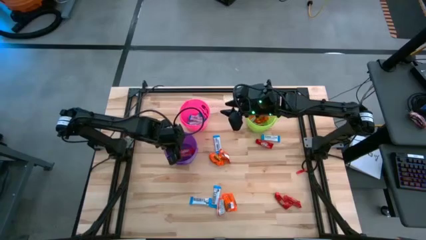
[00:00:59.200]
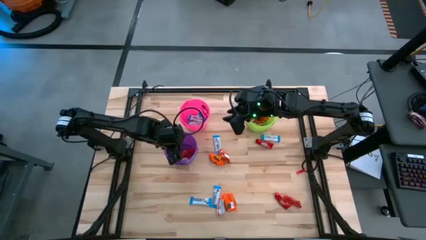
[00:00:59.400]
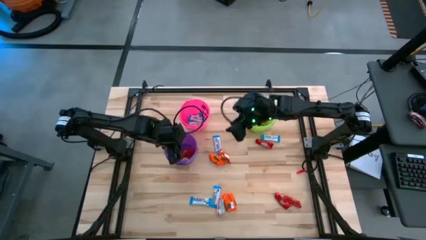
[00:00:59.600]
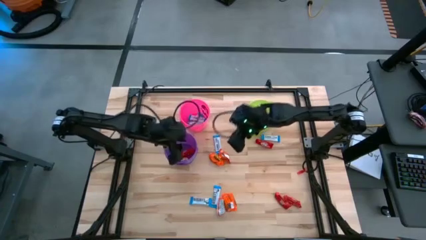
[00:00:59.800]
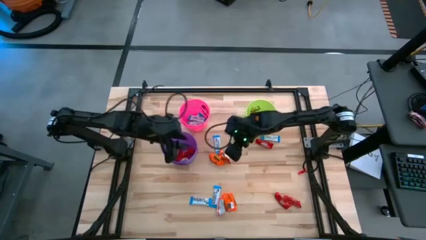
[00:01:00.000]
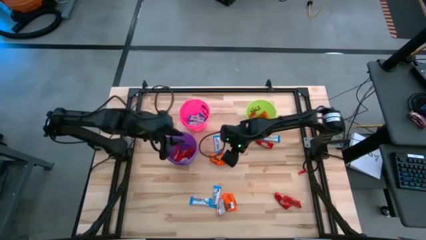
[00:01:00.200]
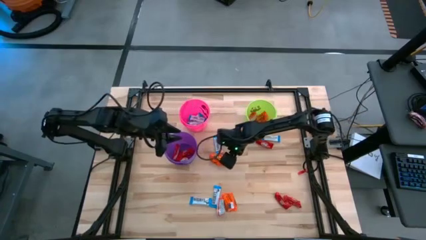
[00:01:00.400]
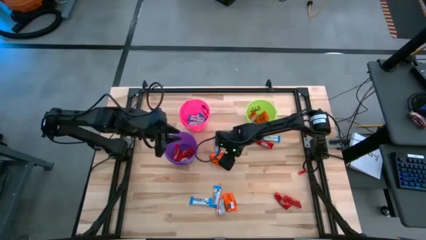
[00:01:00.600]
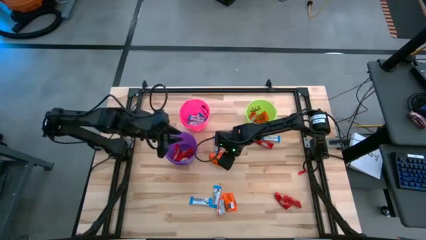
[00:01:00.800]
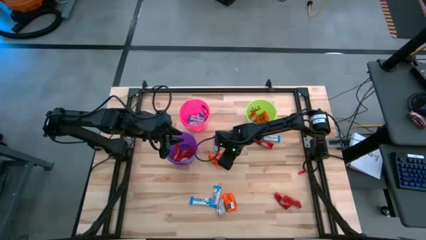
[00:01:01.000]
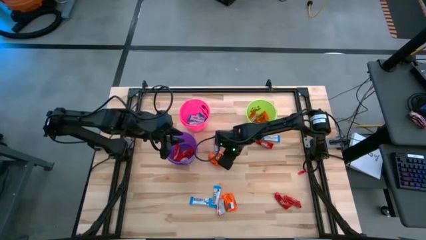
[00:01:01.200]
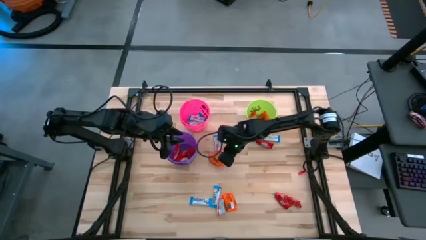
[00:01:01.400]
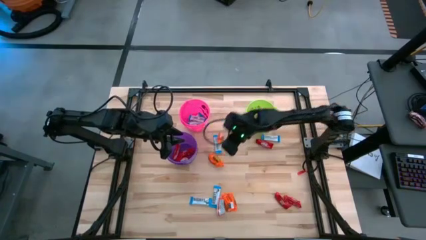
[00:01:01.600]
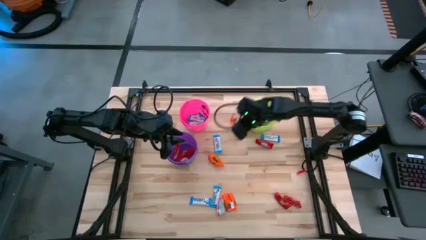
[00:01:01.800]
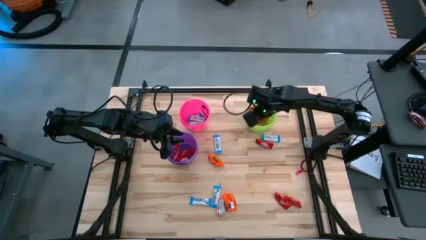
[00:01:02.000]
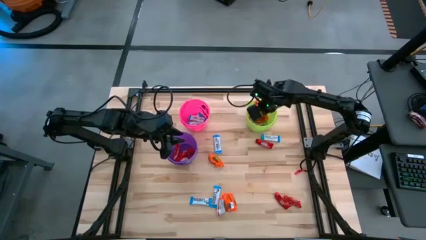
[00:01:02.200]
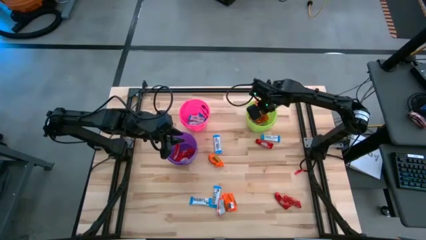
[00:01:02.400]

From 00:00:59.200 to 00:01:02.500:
Task: Sort candy
Put the orange chocolate into the green bucket

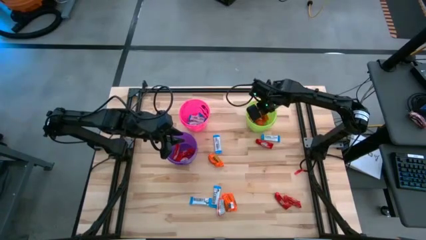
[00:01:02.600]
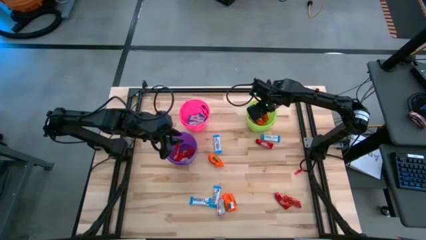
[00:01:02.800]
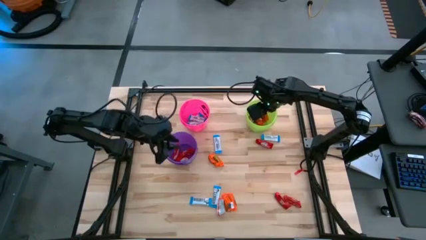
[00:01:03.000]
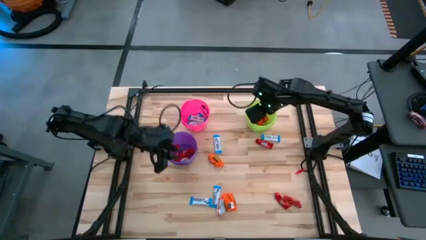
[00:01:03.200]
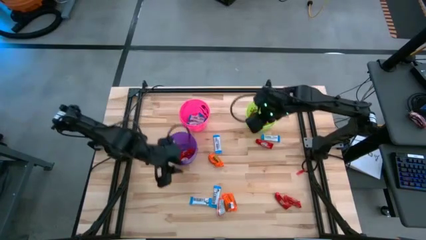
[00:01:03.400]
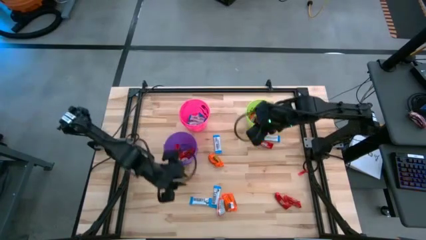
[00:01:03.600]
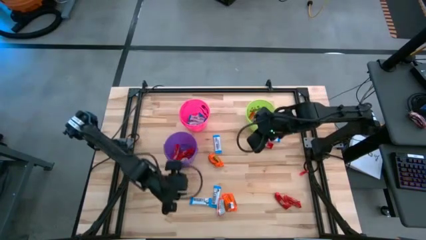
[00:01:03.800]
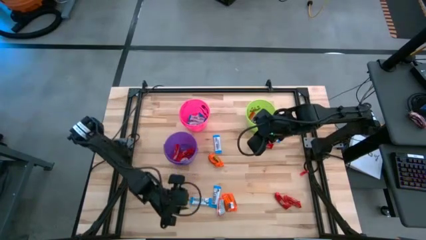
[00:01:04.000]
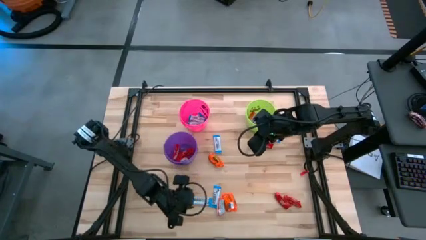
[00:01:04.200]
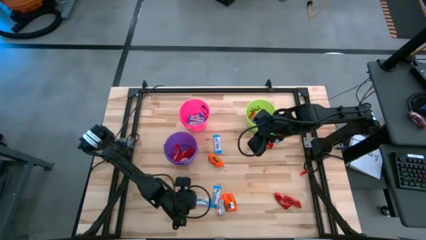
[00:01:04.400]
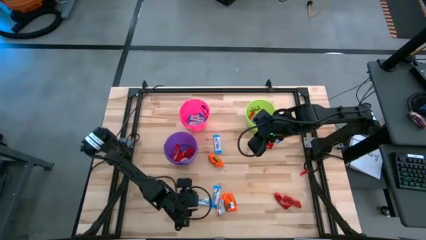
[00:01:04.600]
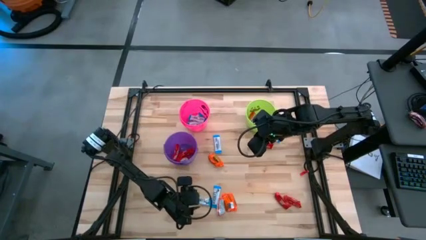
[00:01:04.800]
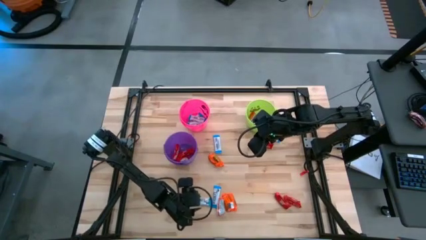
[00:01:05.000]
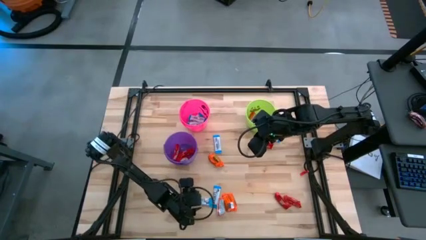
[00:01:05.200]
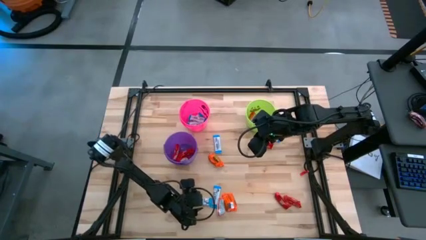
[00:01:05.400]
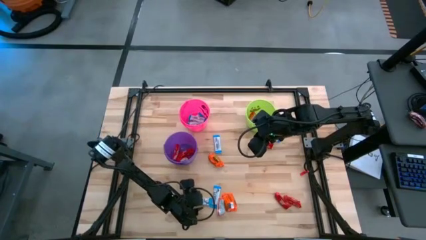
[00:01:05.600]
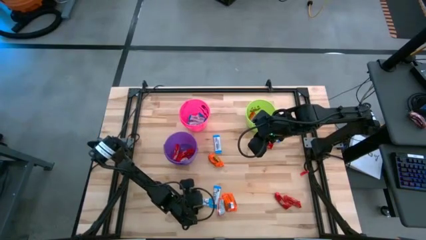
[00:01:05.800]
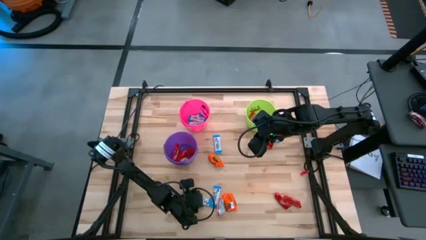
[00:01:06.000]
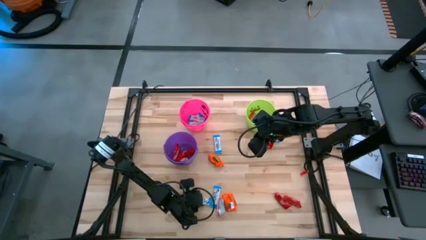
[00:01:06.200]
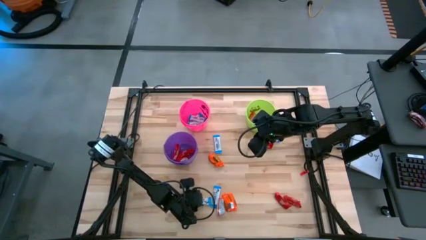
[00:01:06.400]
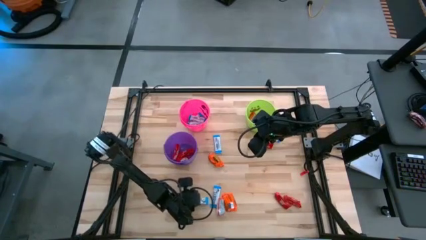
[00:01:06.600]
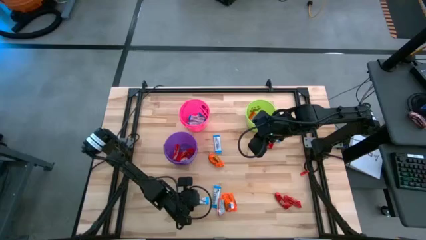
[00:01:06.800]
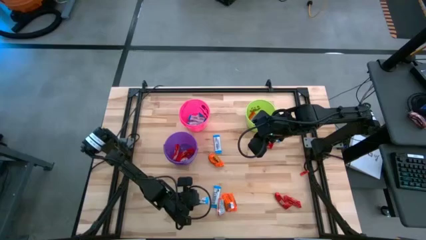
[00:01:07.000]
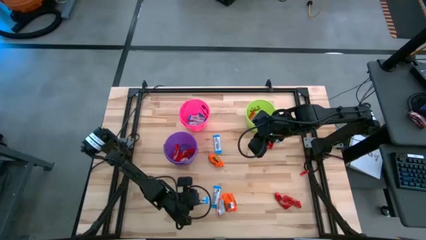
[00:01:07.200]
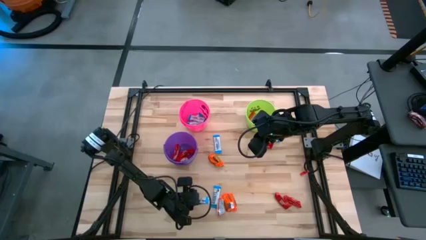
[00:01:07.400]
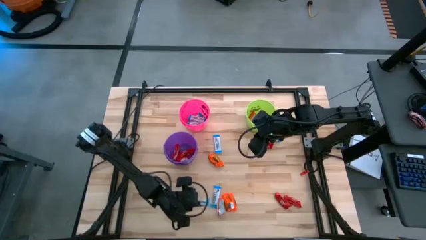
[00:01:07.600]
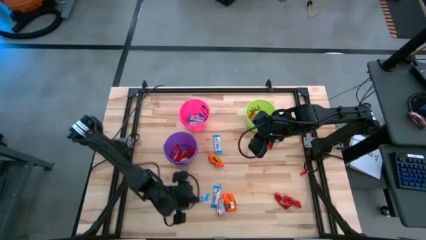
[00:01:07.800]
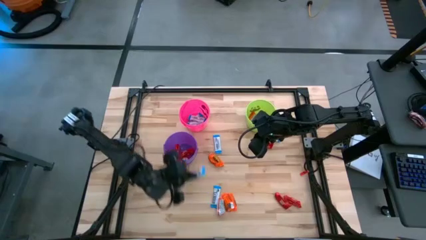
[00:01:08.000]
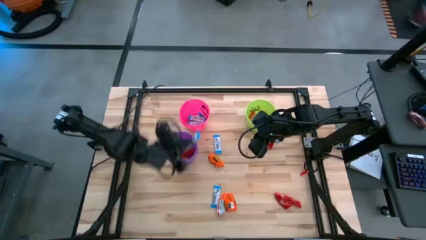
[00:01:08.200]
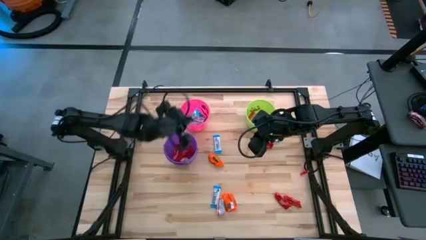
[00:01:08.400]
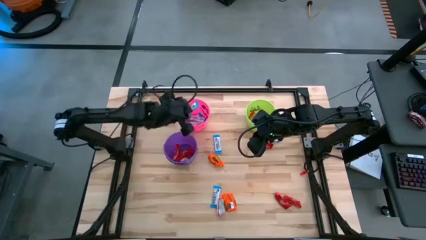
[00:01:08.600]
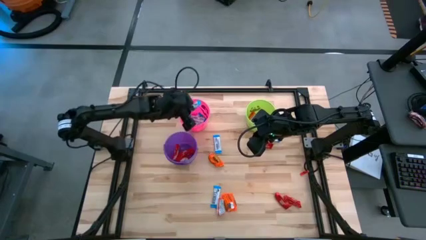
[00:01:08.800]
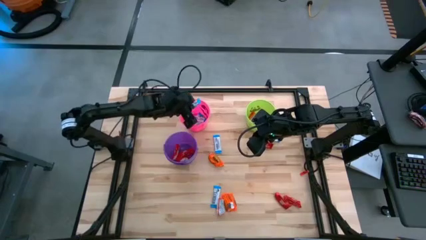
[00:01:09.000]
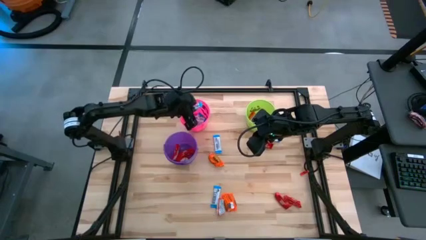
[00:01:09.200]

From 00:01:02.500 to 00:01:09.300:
Put the white chocolate into the pink bucket

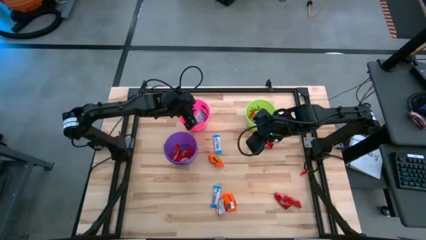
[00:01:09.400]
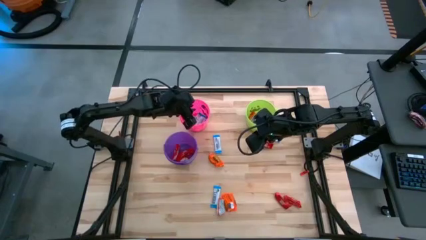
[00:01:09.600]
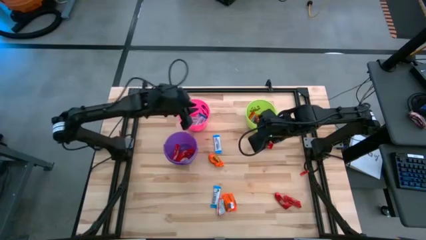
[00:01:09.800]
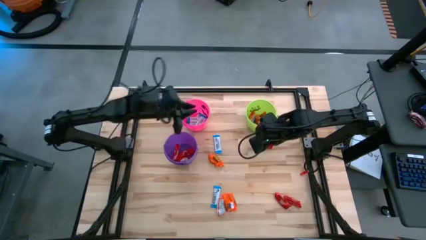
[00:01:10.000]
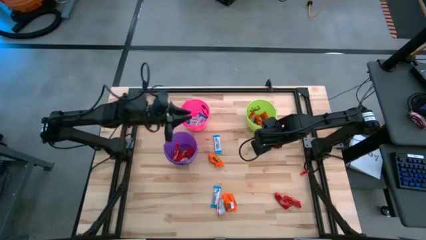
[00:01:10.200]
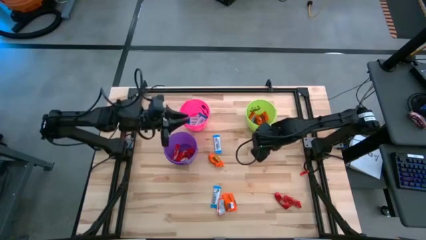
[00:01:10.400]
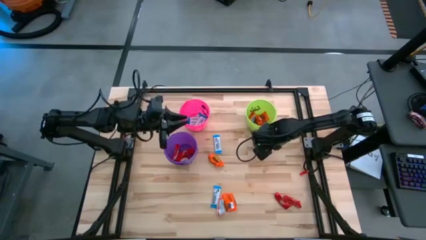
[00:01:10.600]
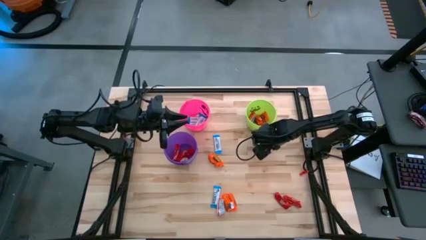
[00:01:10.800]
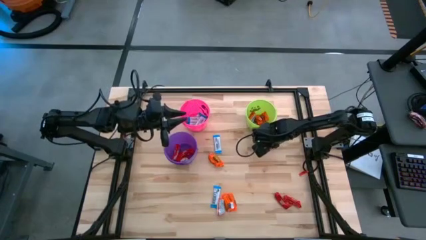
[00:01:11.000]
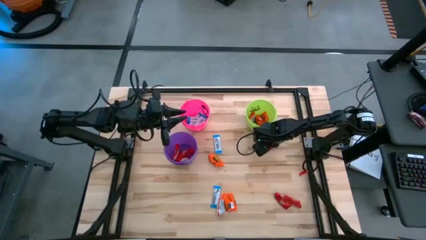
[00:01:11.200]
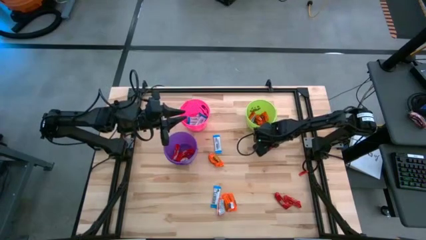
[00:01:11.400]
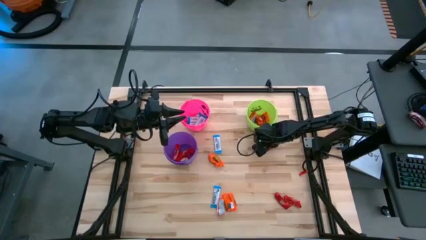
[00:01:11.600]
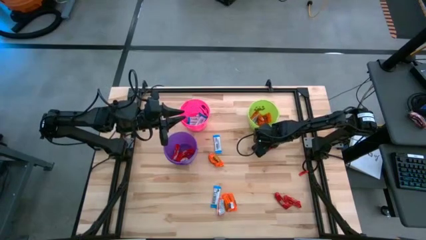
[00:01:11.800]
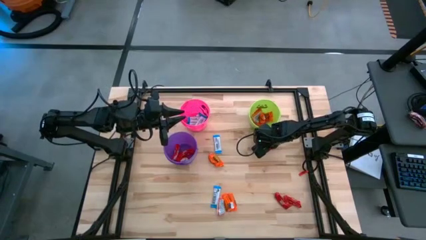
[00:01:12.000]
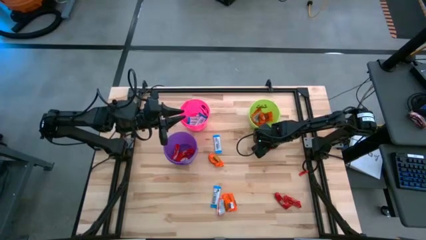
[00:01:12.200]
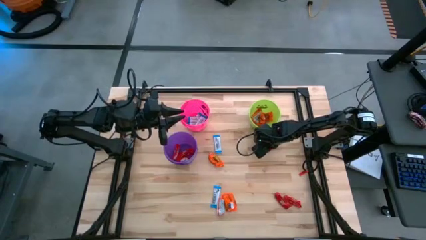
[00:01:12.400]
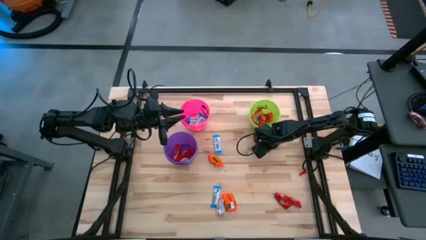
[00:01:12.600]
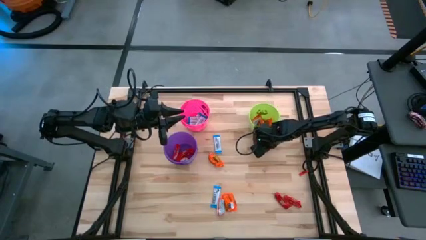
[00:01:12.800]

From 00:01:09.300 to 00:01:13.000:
Put the red chocolate into the purple bucket

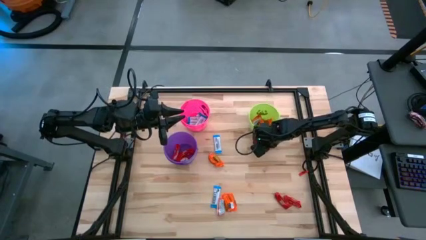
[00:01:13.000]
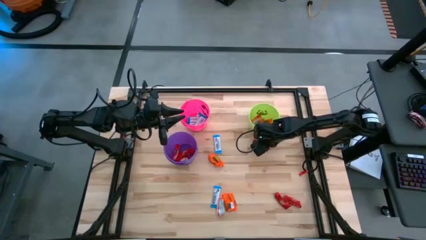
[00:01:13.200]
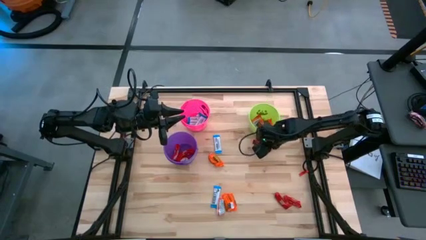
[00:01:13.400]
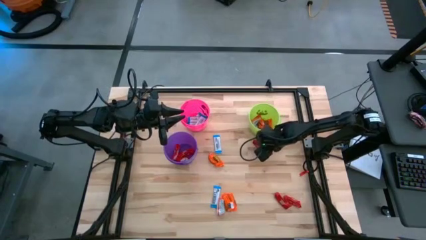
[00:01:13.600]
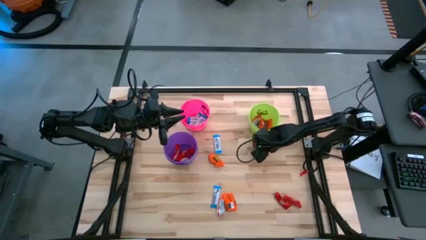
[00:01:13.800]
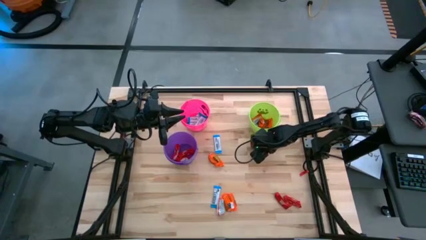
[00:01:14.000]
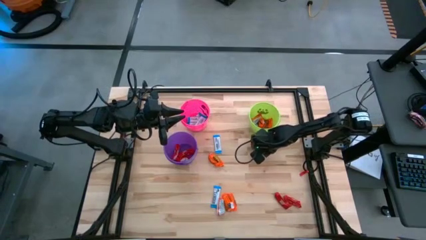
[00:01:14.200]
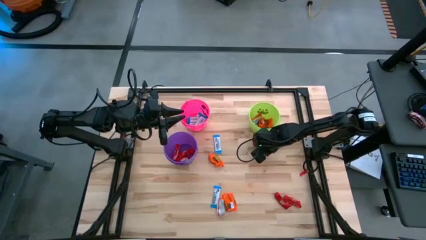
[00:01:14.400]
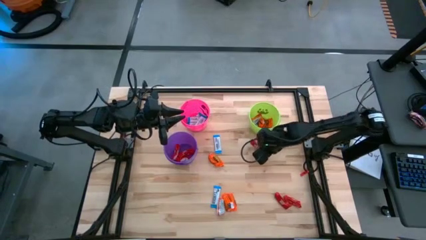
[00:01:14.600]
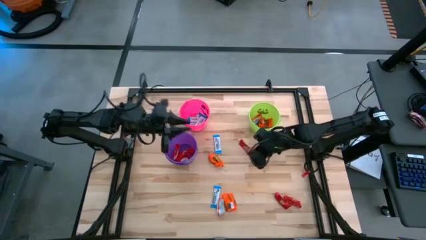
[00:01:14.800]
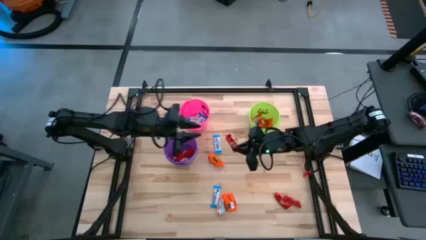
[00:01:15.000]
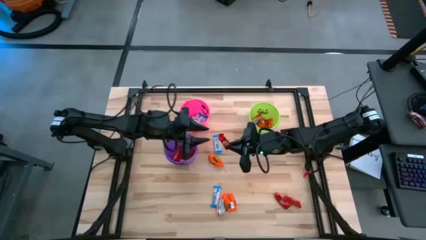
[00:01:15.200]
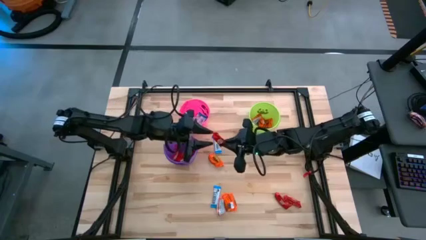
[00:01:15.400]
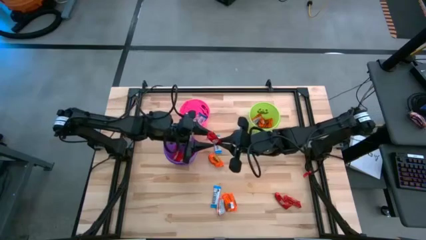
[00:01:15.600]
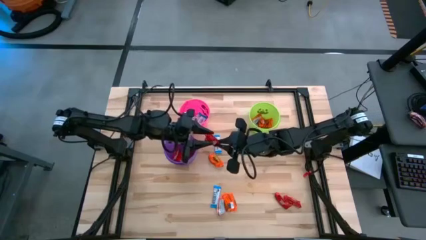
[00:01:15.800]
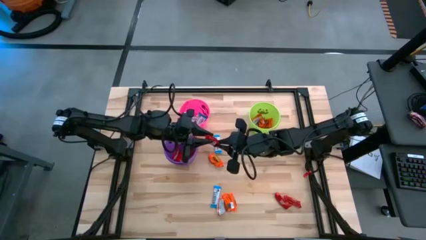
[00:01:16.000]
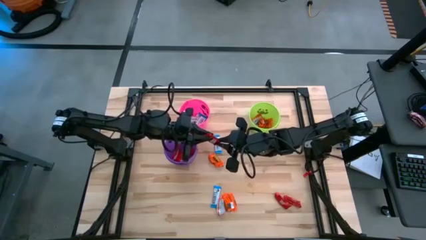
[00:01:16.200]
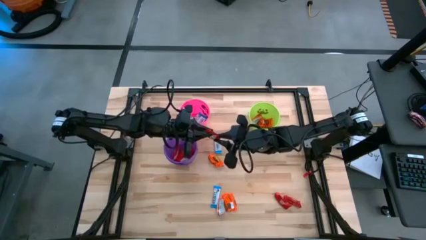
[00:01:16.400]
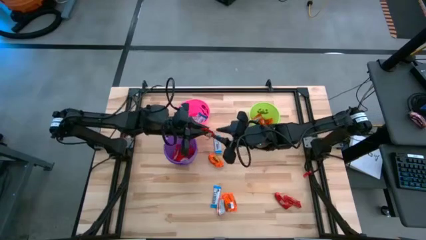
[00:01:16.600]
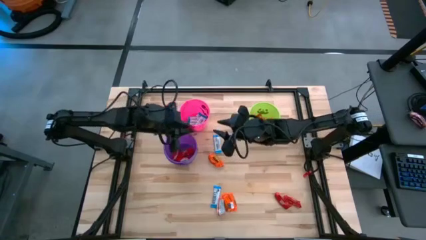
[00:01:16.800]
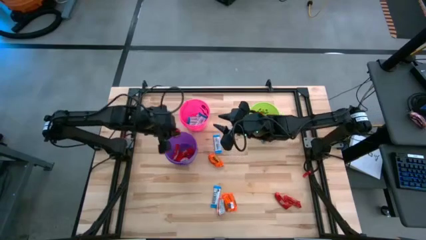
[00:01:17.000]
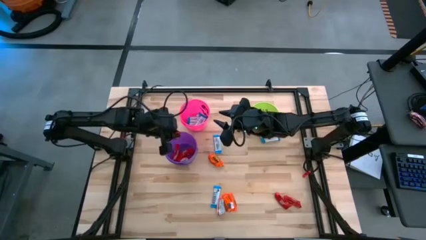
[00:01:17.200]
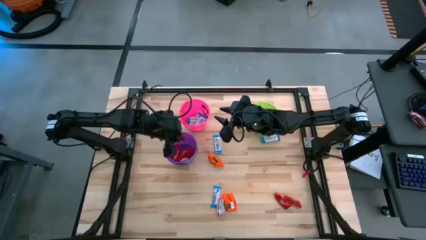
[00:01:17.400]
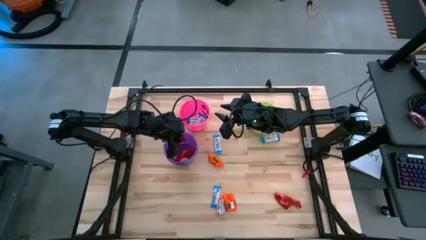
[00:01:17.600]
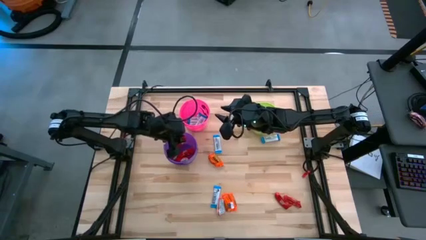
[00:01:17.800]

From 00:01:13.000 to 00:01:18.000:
Put the red chocolate into the purple bucket
